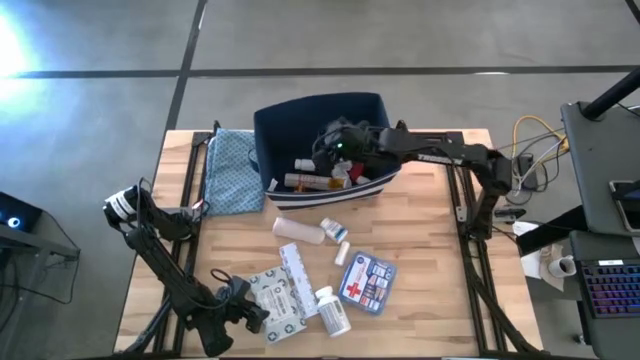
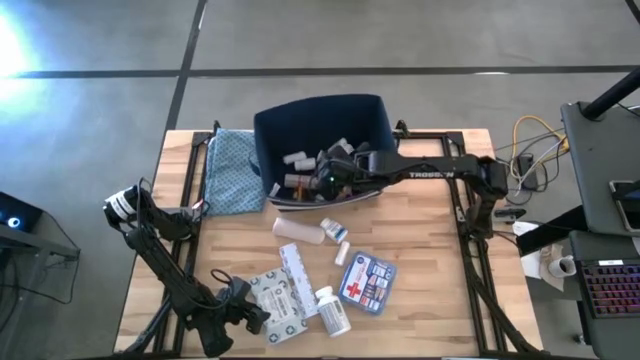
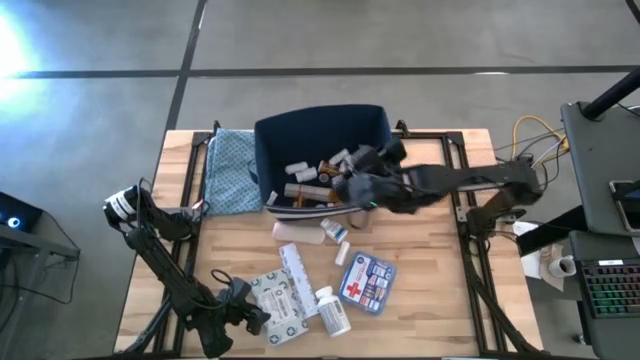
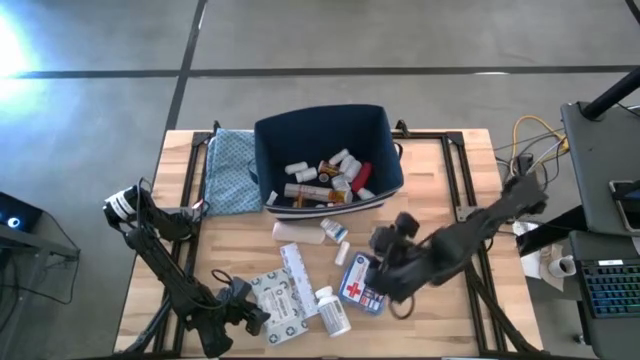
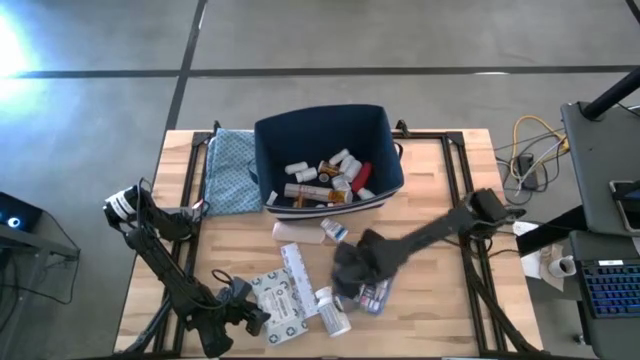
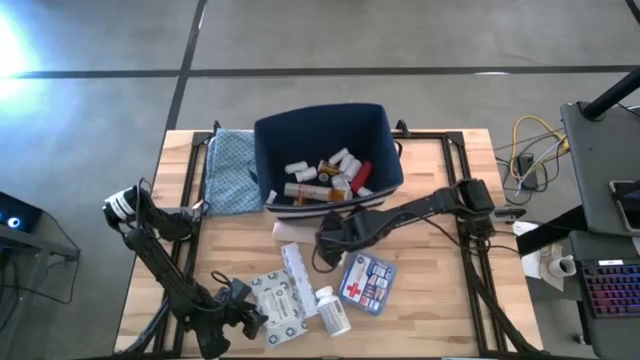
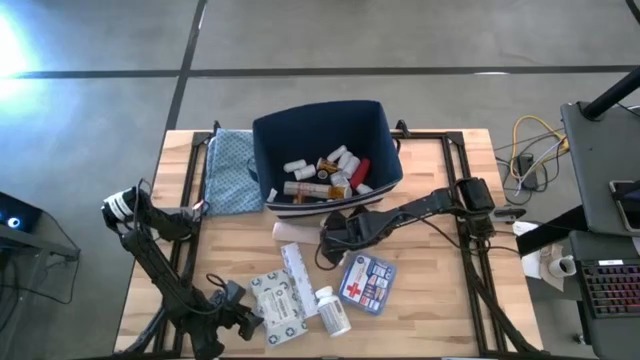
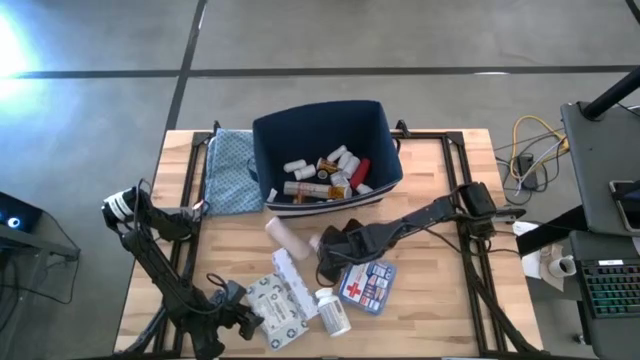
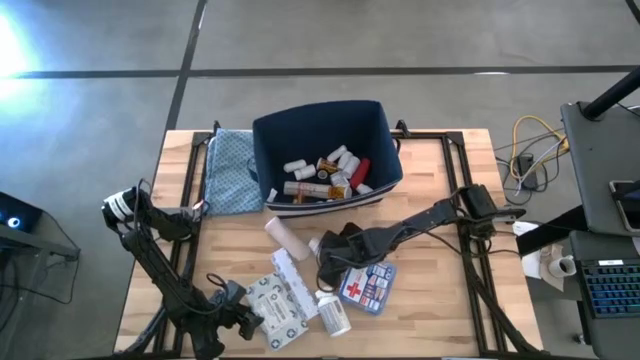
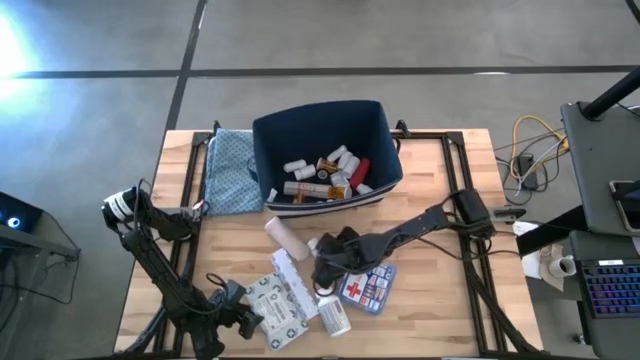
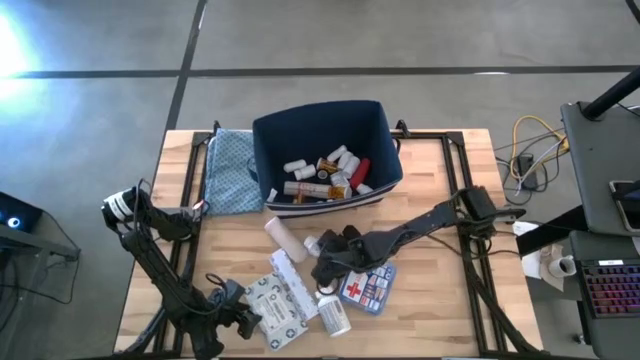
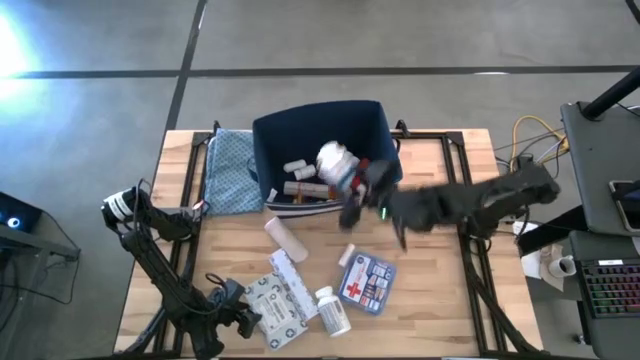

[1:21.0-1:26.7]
Task: Pick & place medical supplies in basket/bin
Put the blue pill bottle into the blue bin

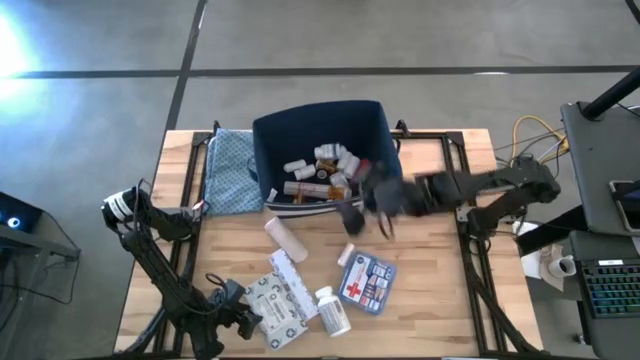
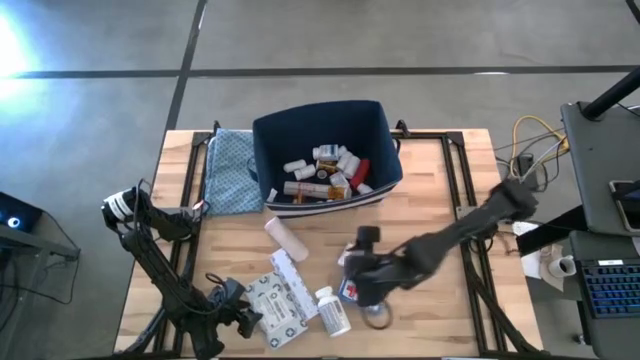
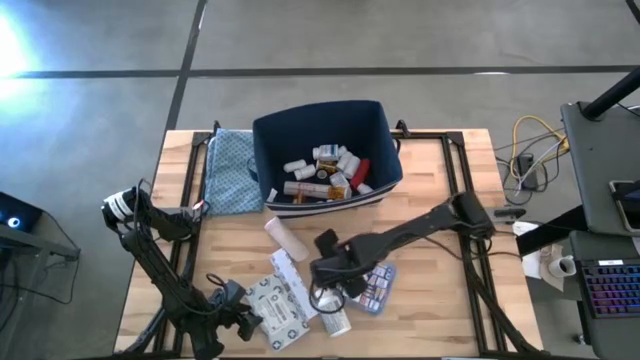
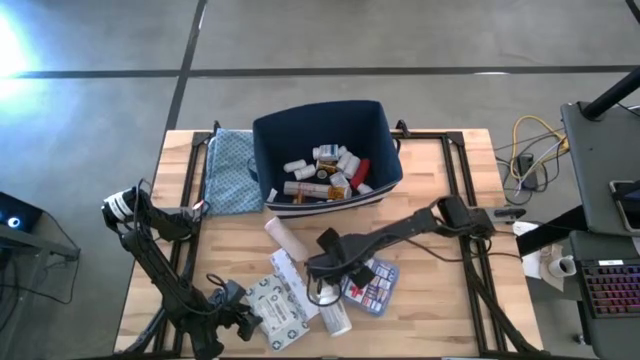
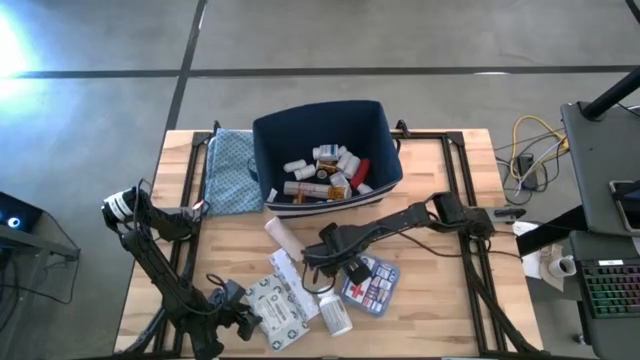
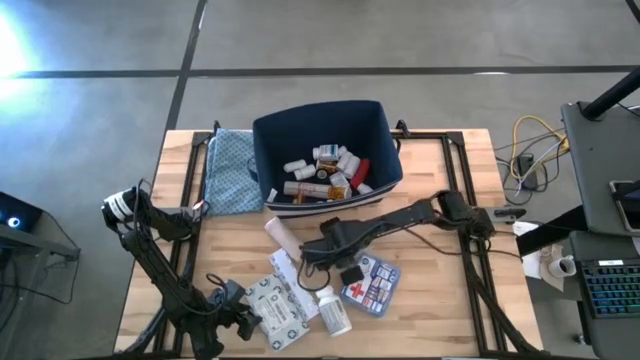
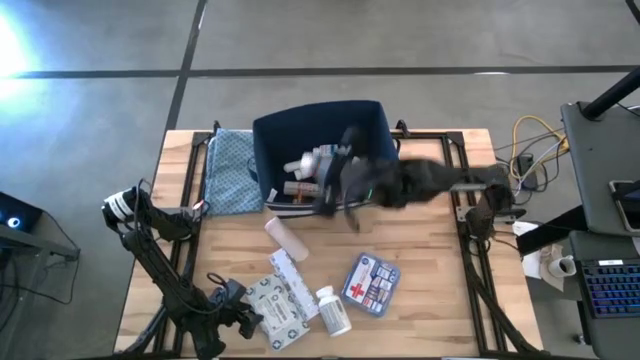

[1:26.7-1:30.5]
Put the white rolled gauze into the blue bin

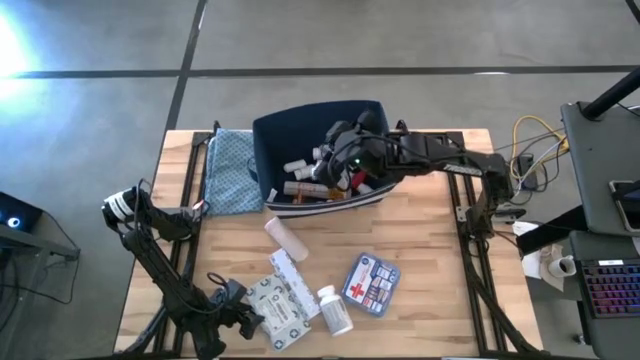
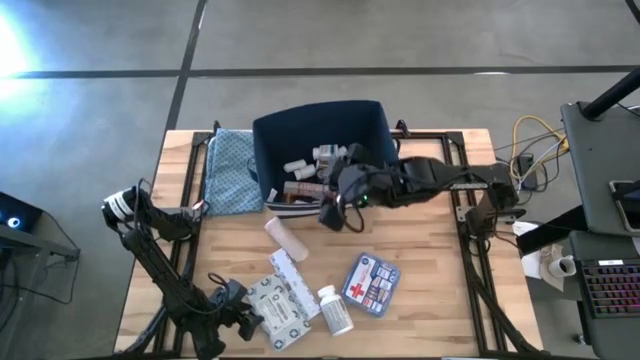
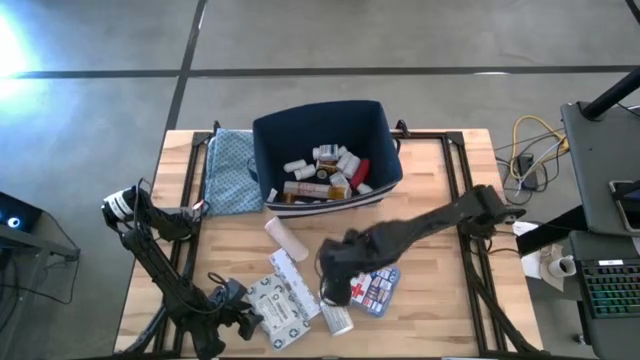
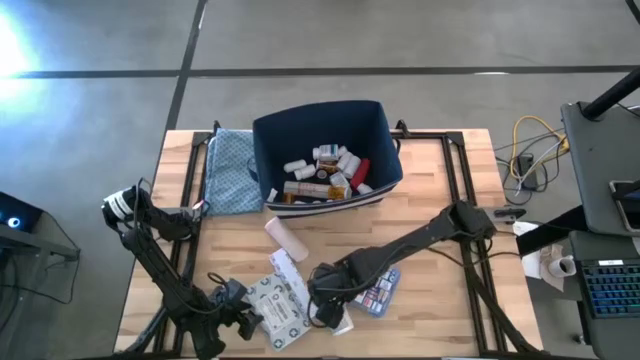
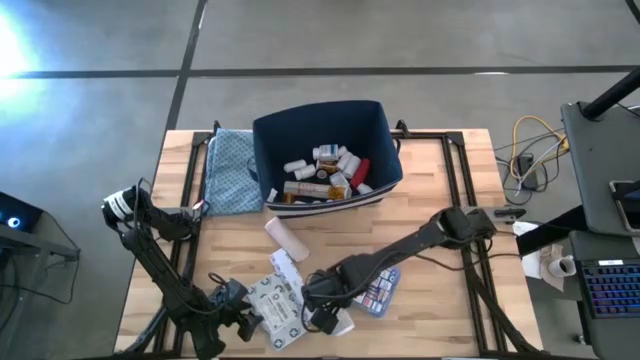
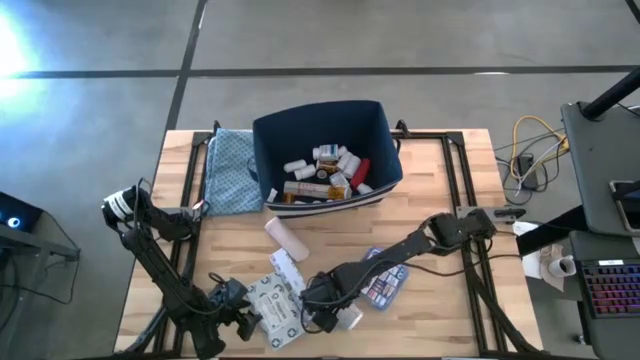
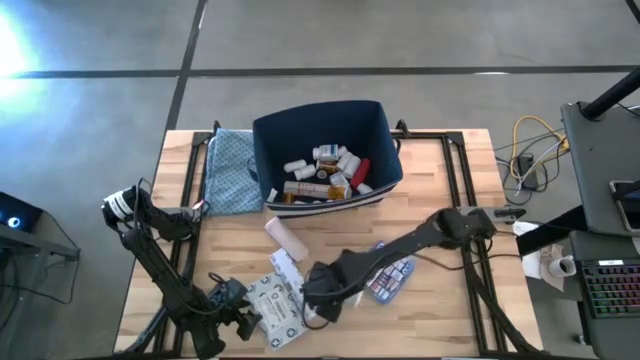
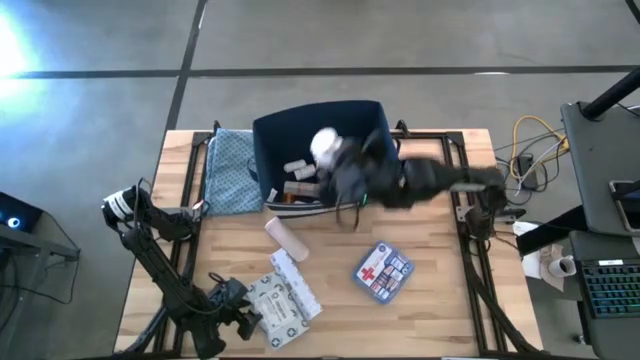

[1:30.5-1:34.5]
Put the white and yellow pill bottle into the blue bin

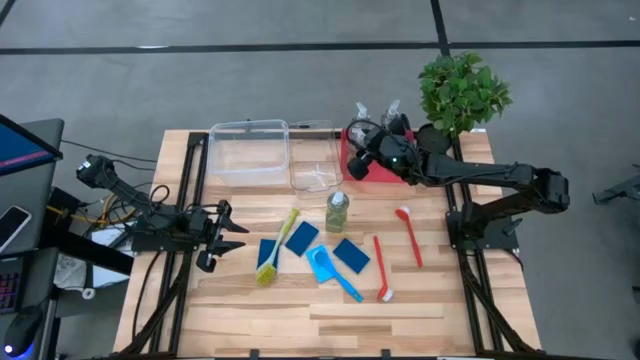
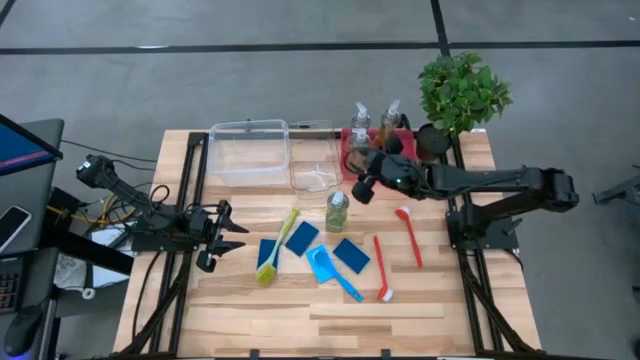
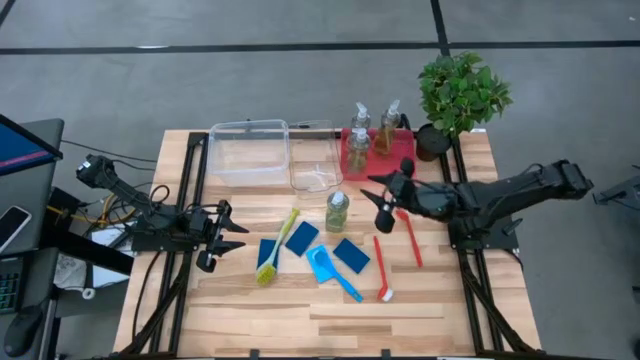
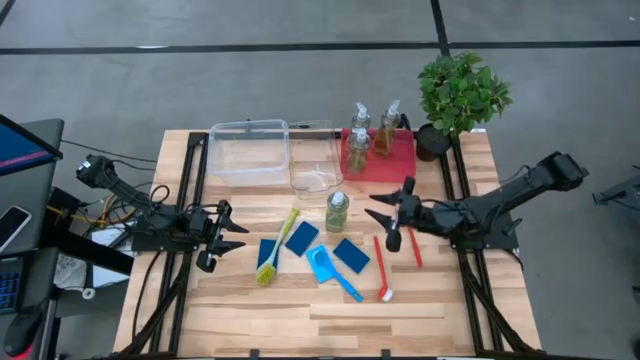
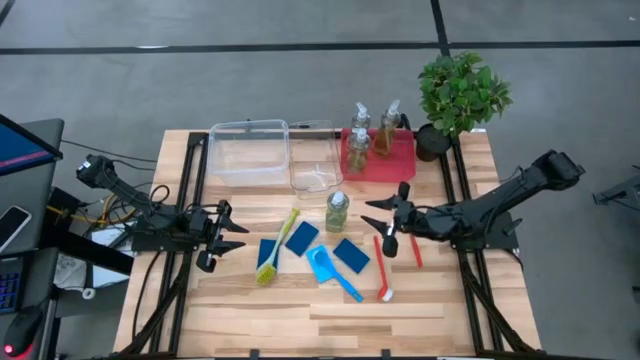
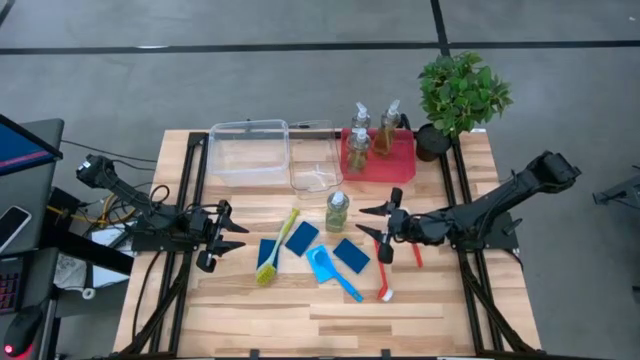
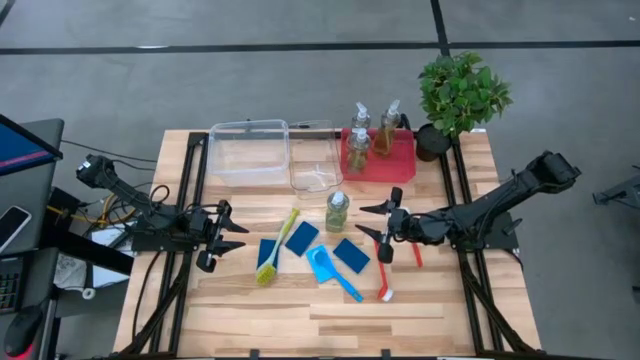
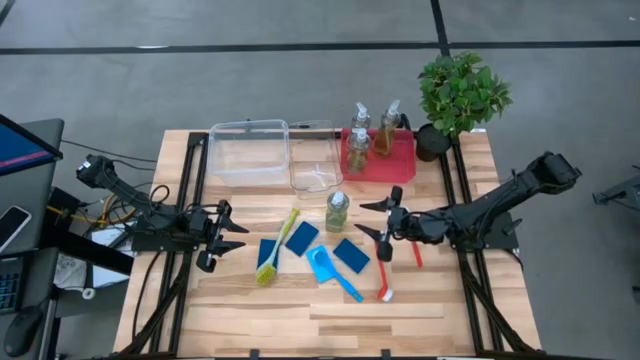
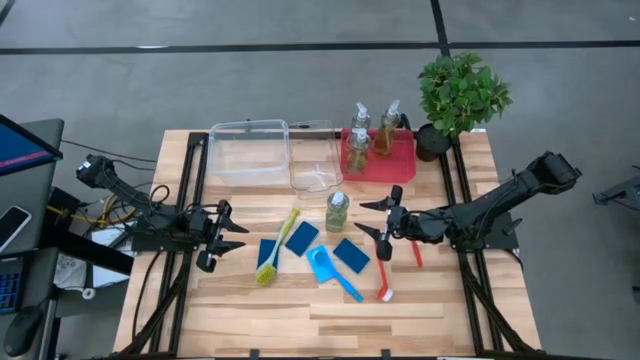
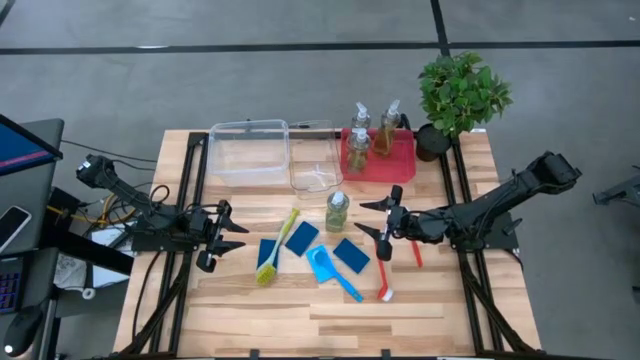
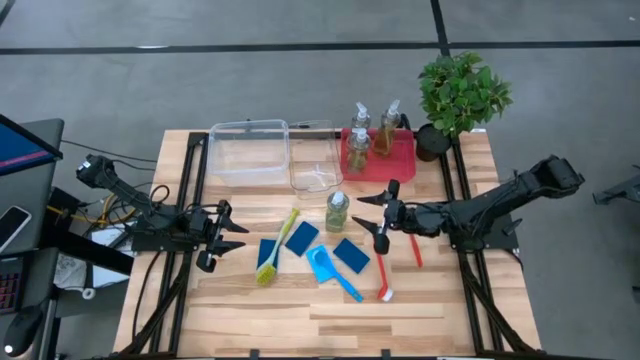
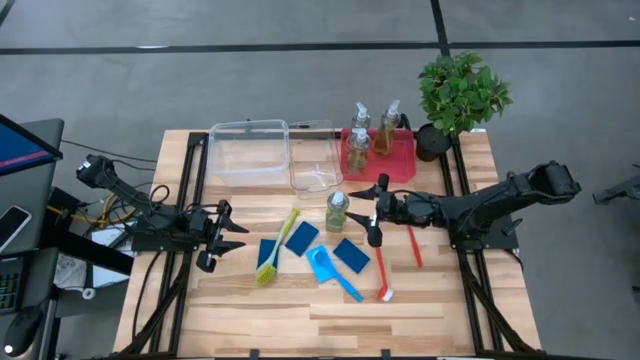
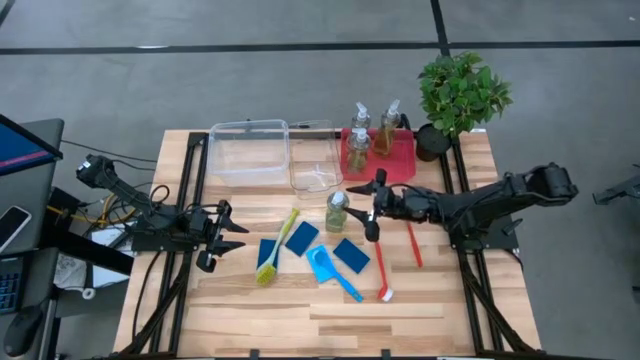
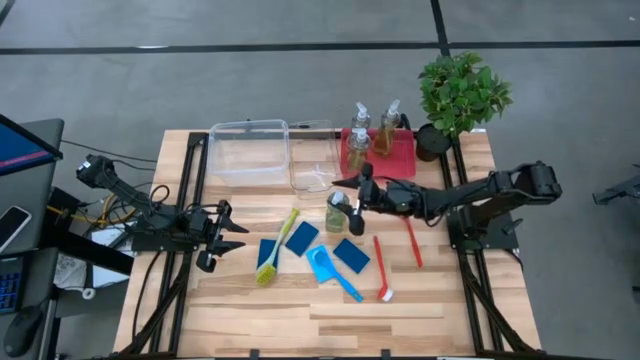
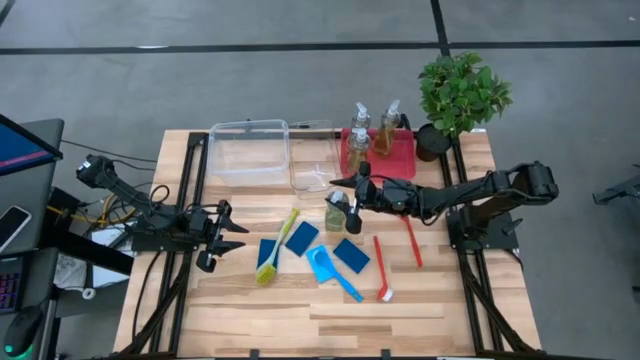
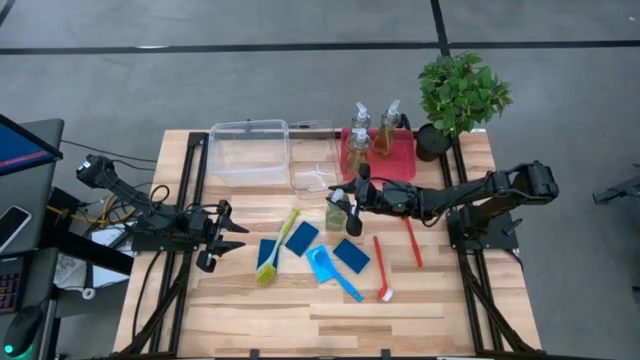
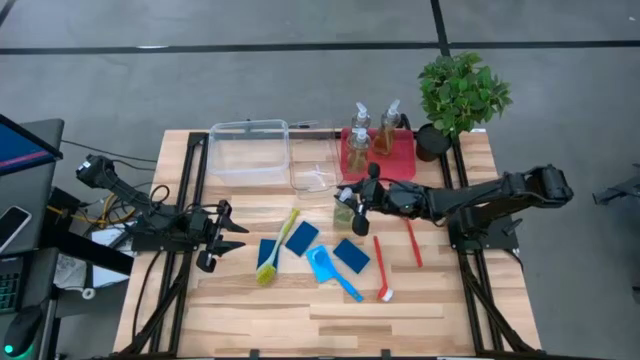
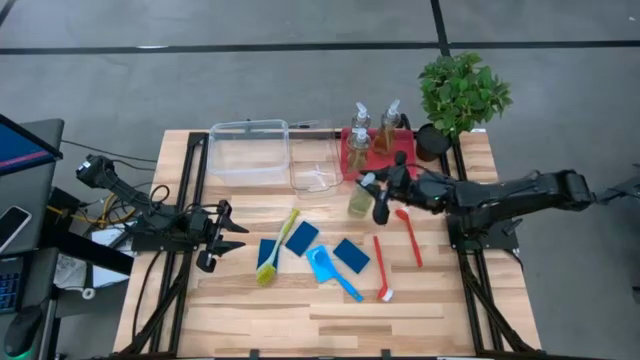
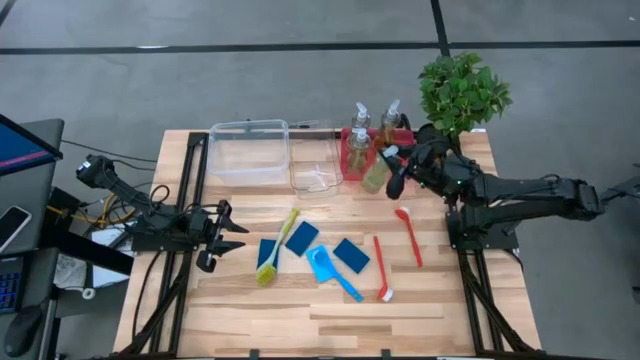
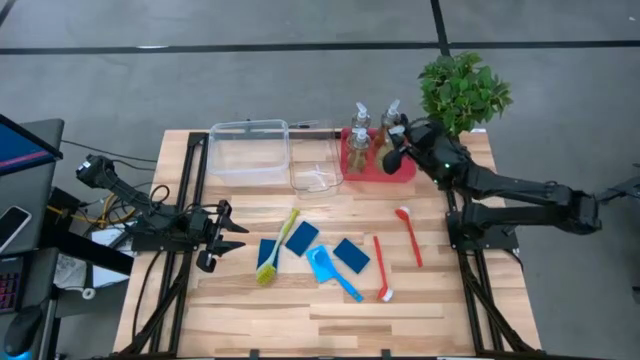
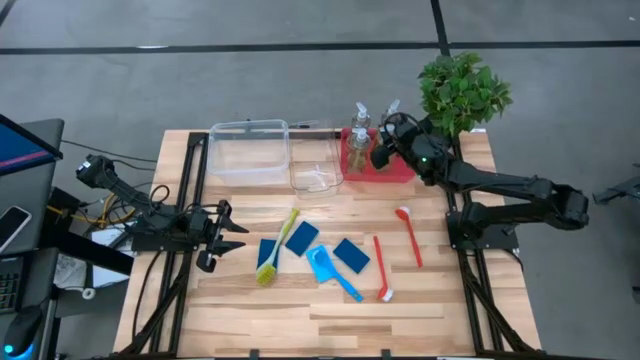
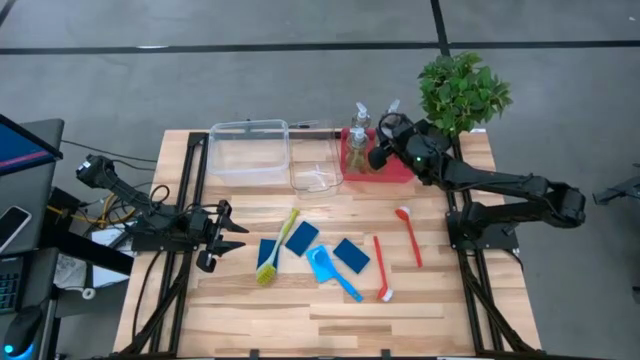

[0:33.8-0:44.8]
Task: Pick & Place Kitchen Sink Supplies
Put the soap dispenser into the red bin
